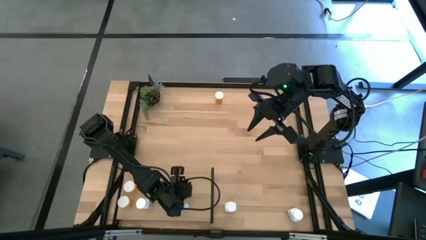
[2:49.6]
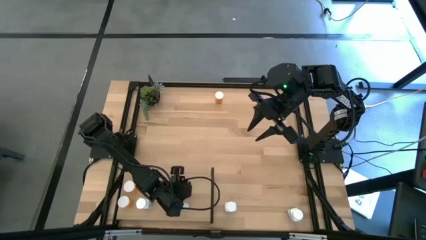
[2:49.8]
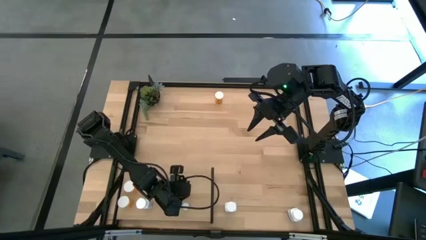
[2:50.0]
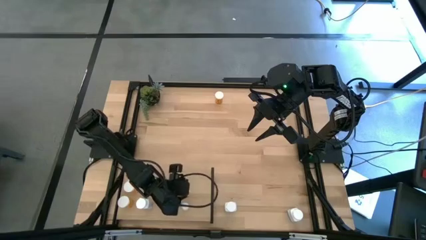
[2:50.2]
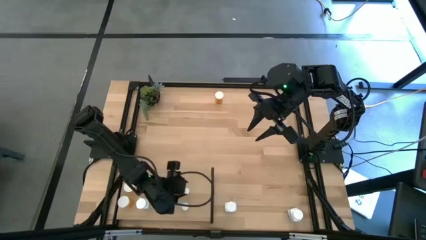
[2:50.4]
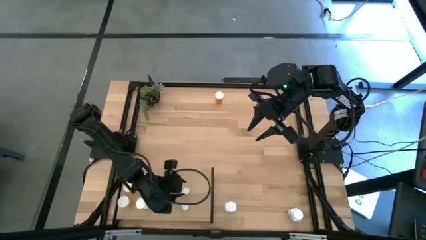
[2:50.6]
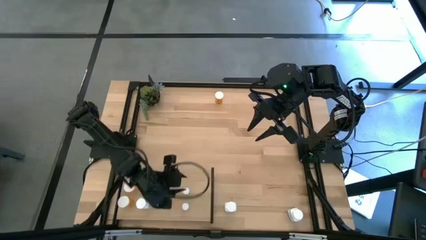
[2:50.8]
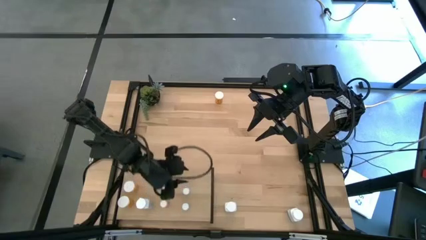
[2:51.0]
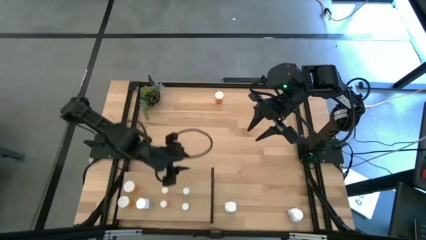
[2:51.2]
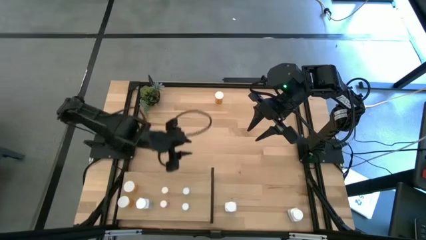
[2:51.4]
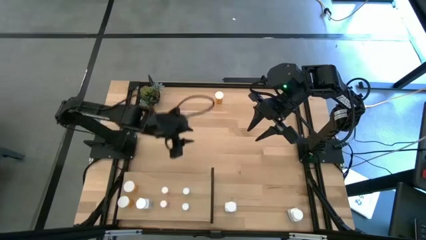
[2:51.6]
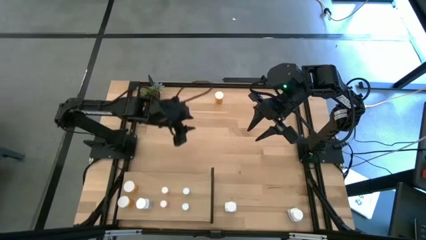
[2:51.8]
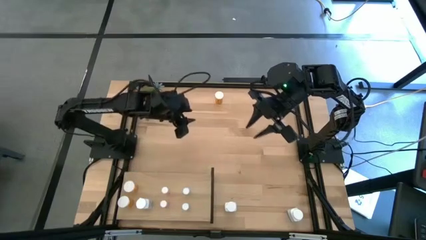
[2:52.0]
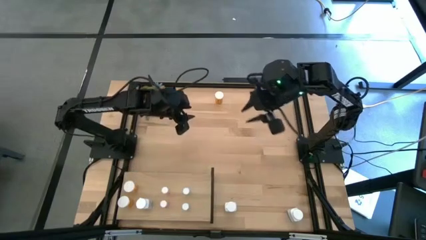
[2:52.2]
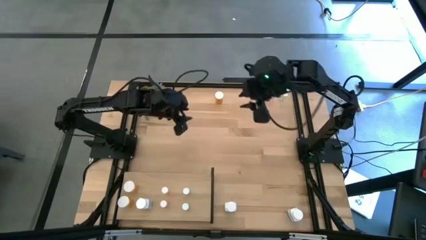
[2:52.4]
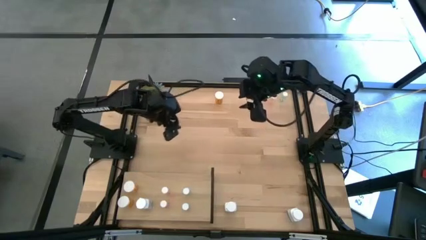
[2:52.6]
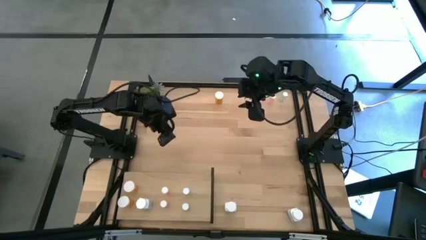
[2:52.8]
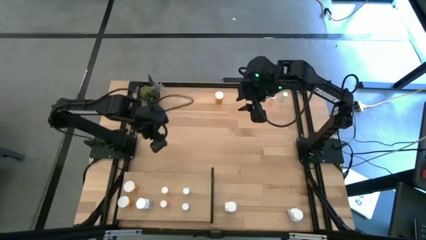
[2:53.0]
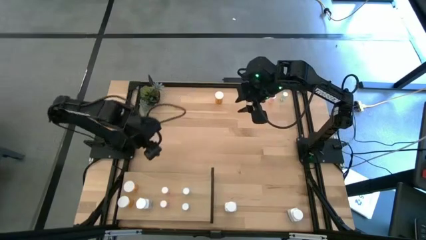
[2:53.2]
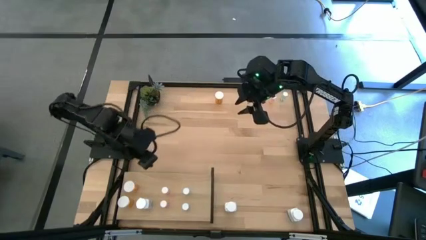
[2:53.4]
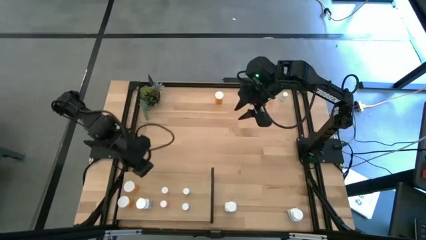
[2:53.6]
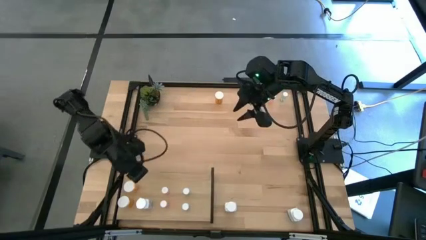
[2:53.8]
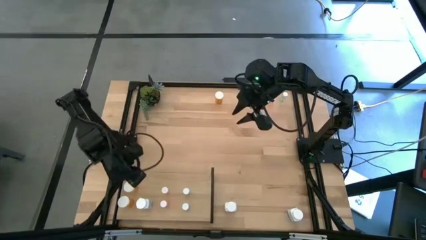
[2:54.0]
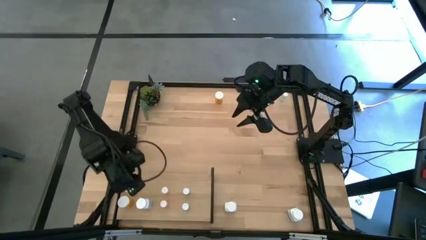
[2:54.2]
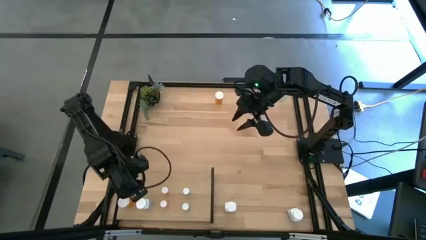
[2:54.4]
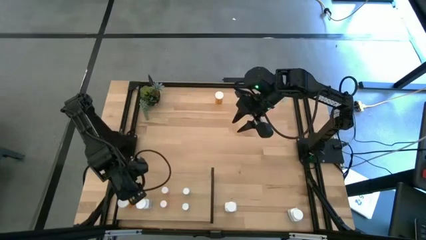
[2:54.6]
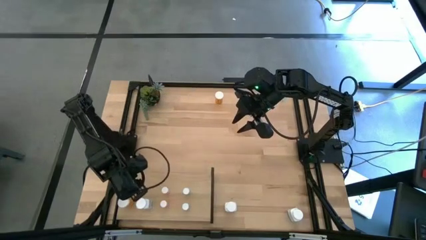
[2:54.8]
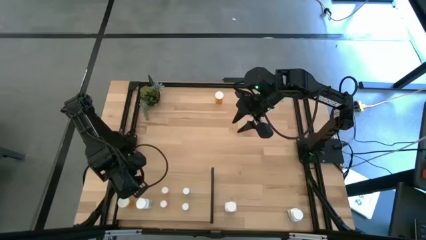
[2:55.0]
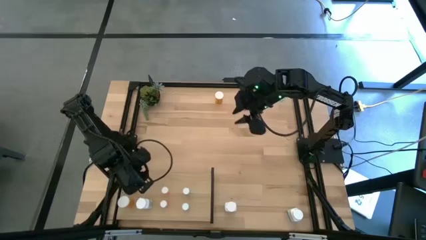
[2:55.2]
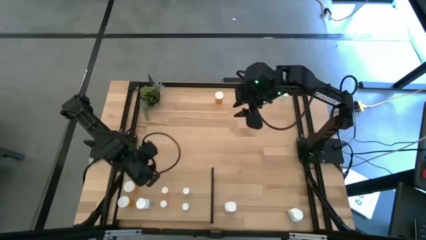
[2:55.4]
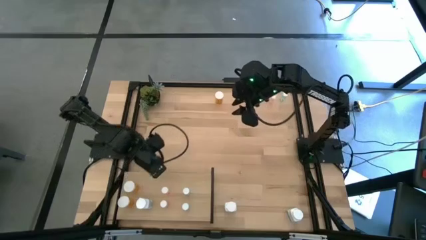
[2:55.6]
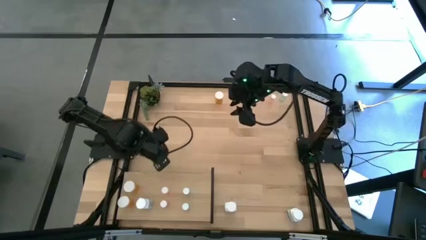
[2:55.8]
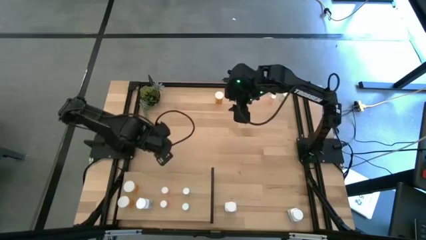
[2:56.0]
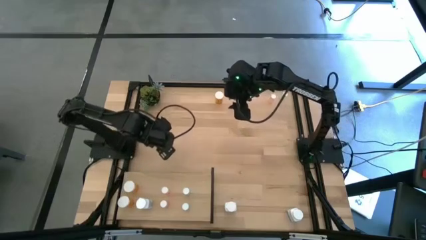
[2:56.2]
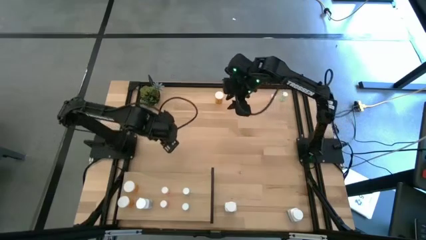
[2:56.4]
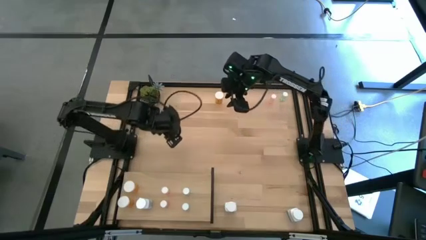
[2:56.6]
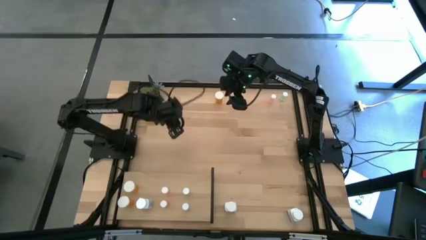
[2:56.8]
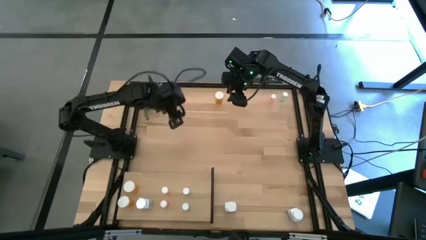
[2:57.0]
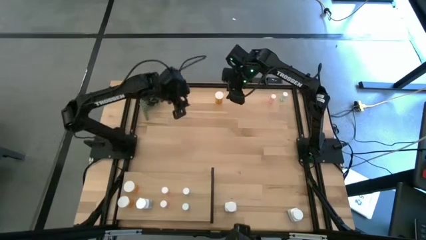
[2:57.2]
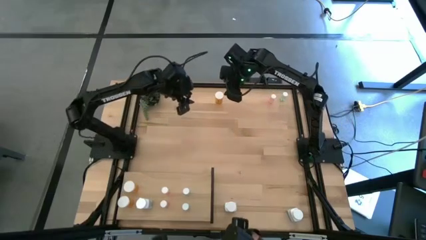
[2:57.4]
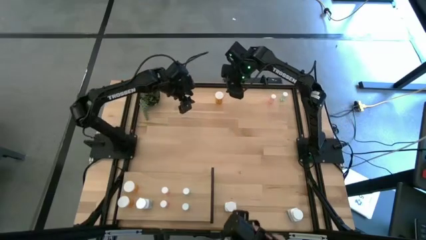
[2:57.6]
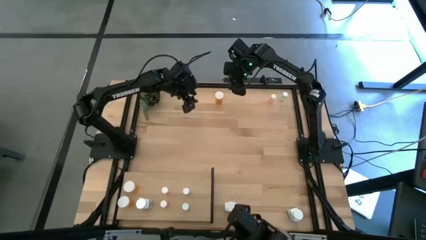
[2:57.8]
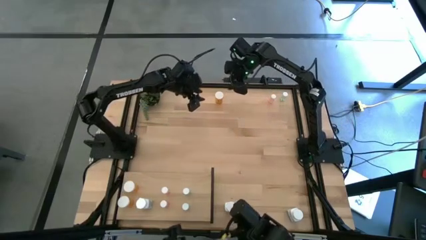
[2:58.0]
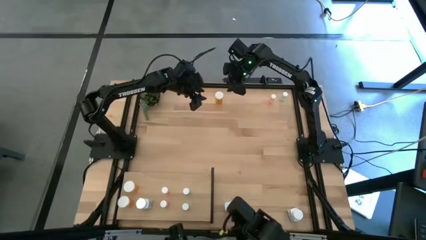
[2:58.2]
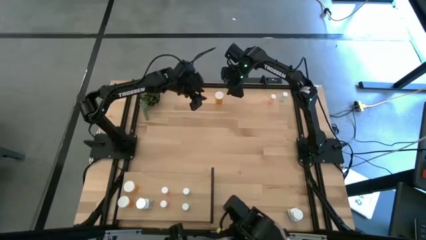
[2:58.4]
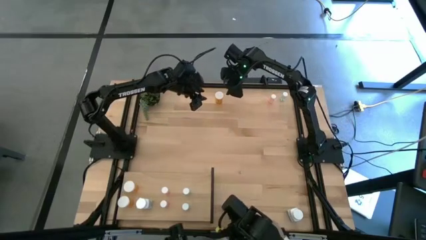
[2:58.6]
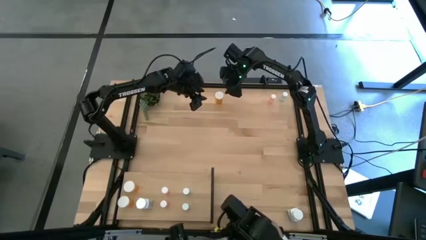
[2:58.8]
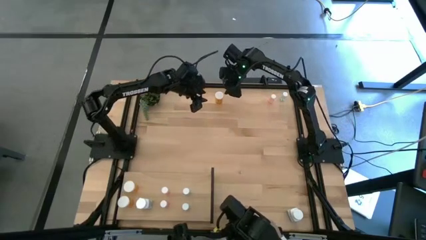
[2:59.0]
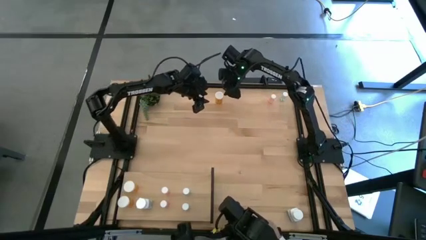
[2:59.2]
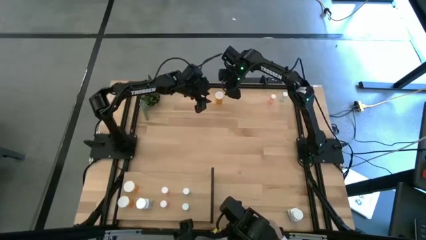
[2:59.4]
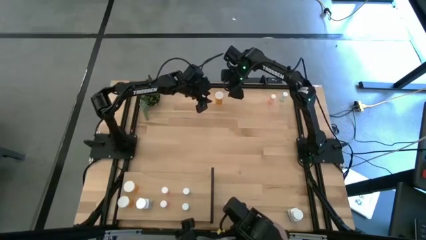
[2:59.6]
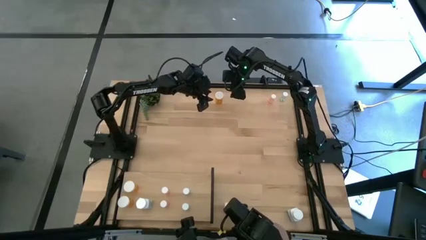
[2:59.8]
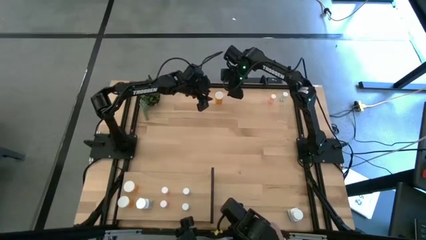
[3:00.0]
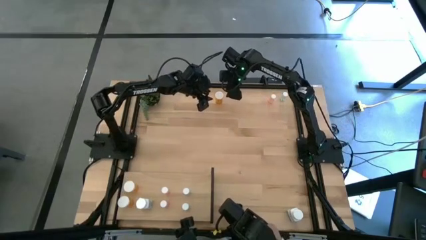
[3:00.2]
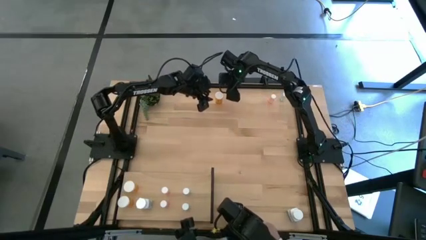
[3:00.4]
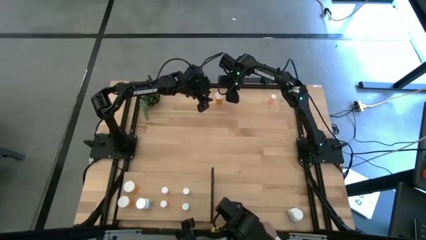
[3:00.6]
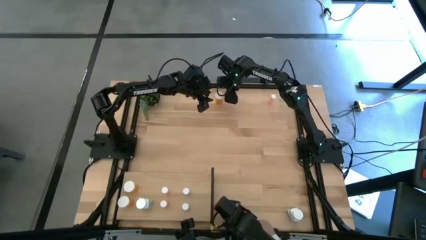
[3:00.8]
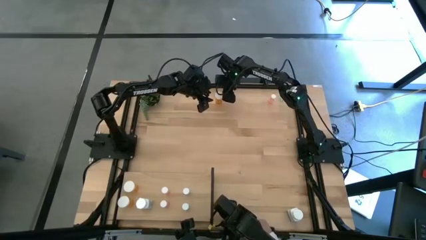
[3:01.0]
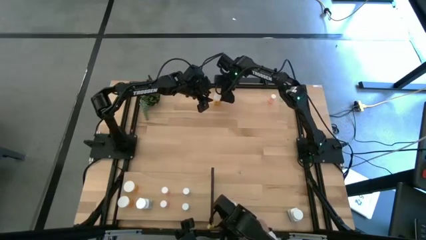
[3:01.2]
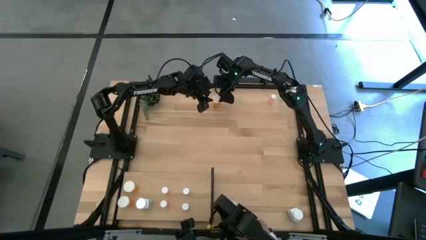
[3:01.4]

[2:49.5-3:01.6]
Task: Pick and place medicine bottles onto shelf by color
Adjust the big orange pill bottle on the table

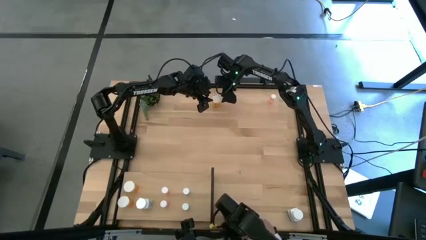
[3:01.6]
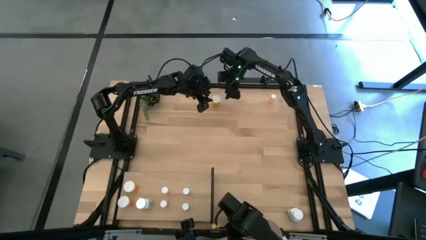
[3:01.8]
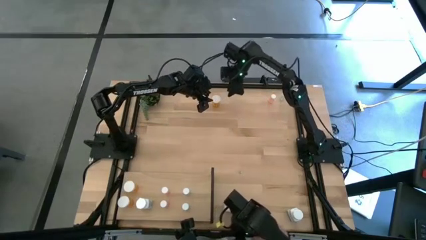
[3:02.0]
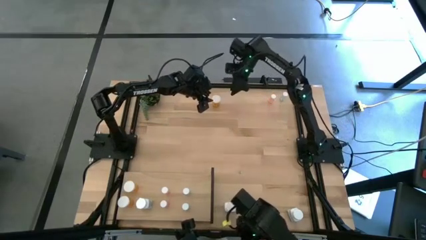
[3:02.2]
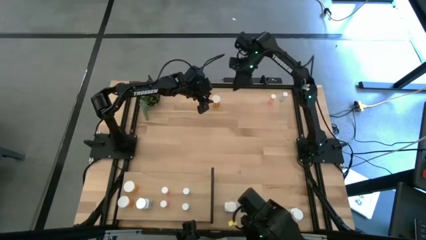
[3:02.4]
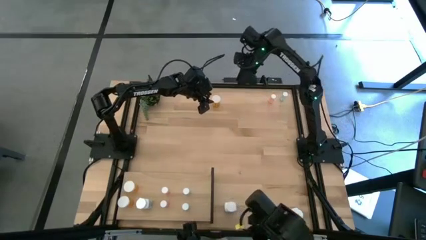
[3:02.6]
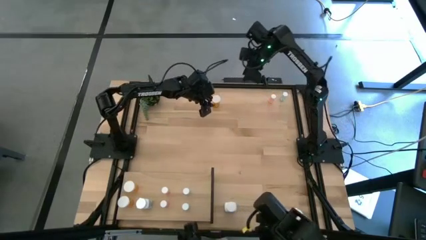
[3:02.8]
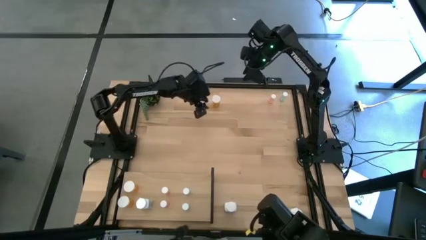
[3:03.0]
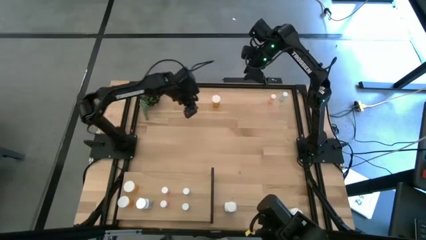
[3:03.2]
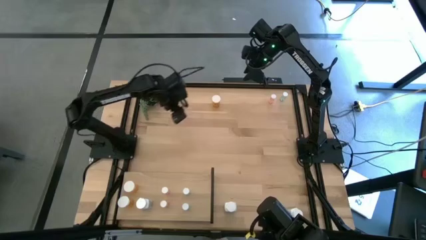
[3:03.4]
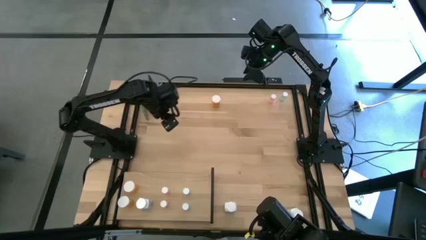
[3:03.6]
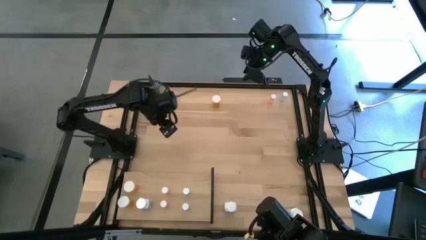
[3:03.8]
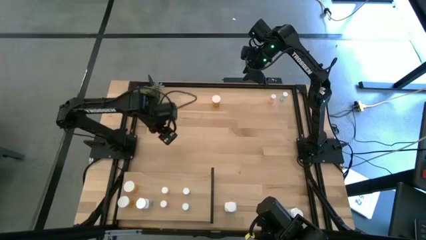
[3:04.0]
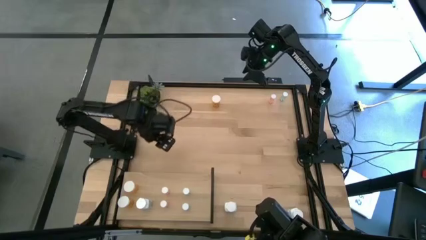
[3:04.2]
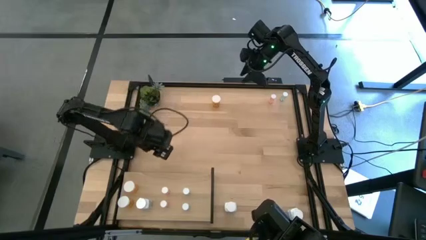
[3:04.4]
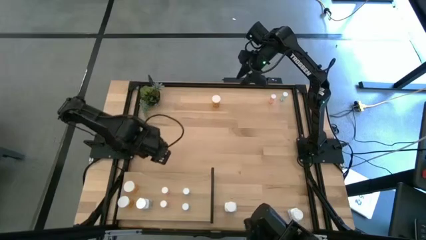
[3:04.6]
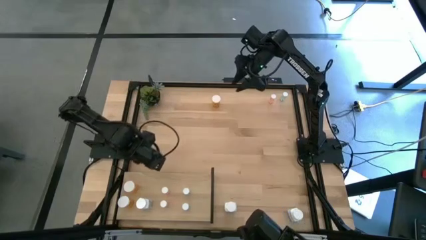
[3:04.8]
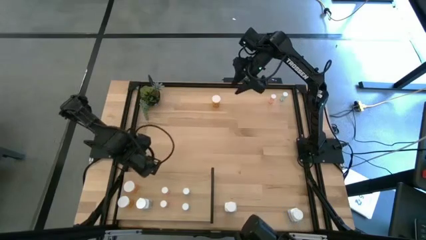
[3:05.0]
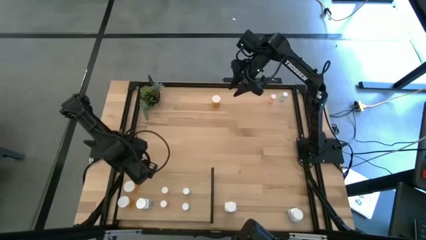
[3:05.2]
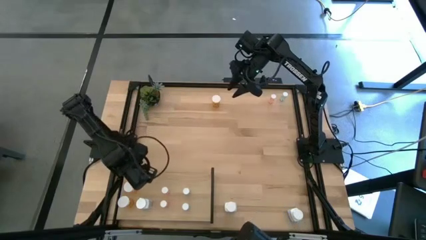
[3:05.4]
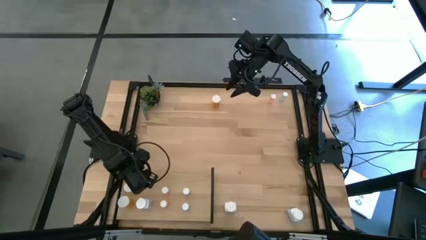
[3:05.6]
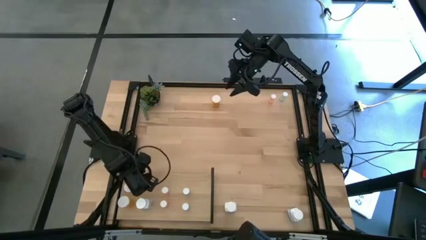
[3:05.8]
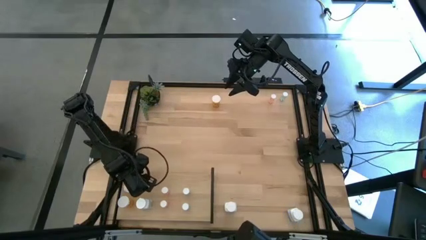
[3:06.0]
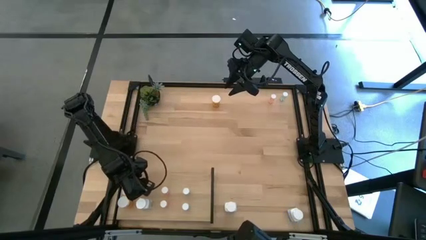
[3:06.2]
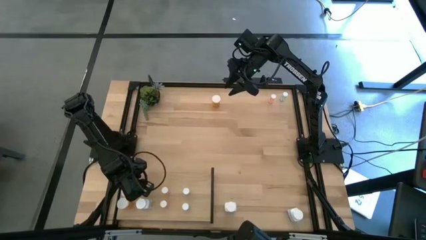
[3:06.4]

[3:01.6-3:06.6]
Adjust the big orange pill bottle on the shelf
